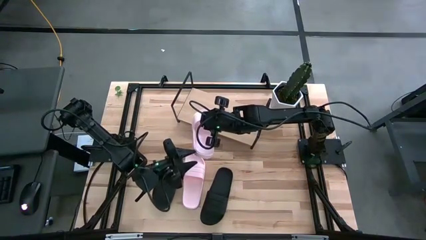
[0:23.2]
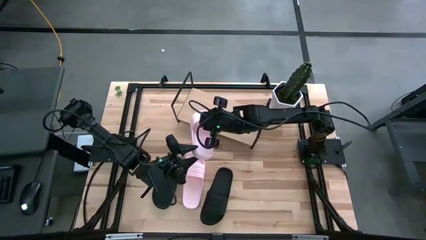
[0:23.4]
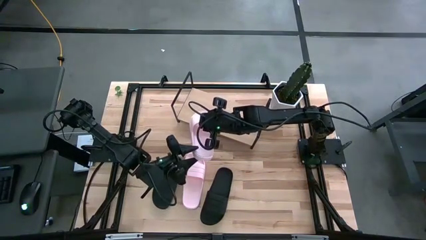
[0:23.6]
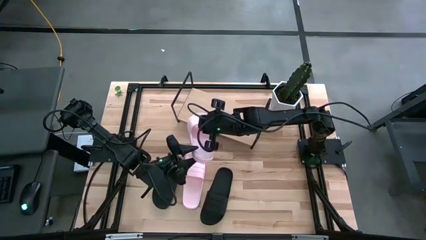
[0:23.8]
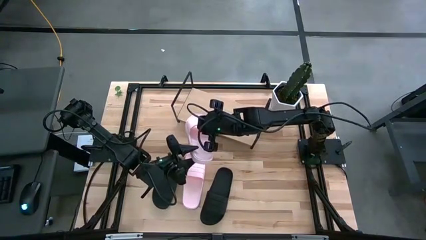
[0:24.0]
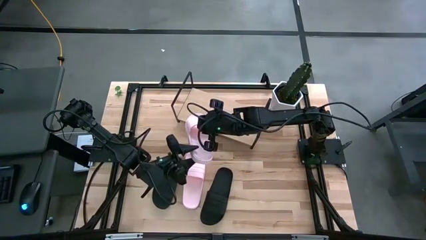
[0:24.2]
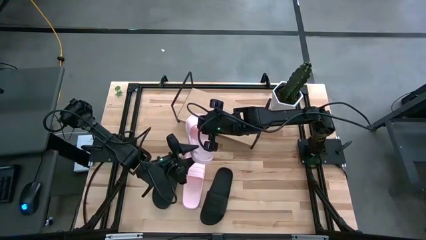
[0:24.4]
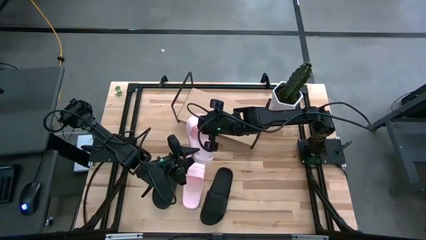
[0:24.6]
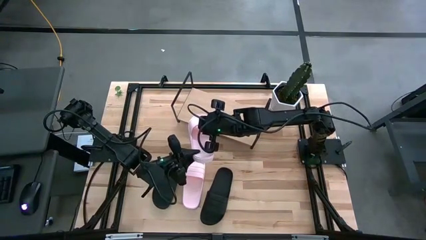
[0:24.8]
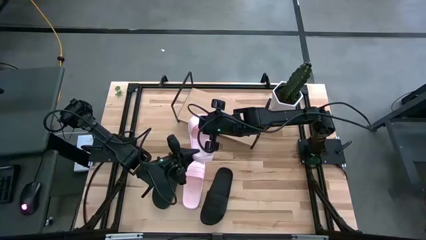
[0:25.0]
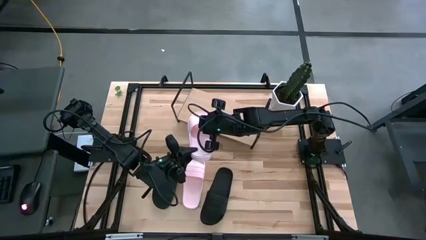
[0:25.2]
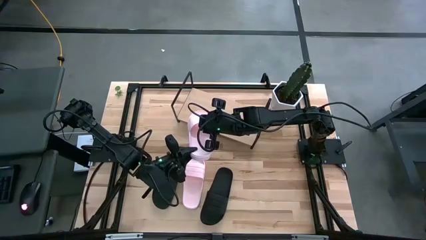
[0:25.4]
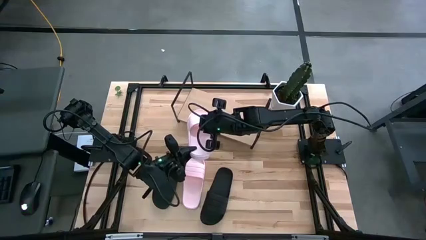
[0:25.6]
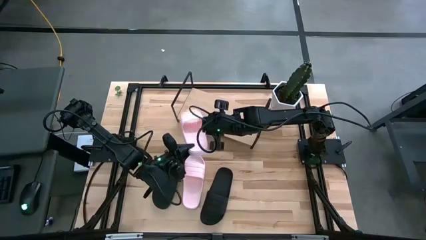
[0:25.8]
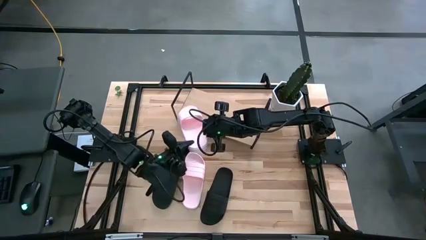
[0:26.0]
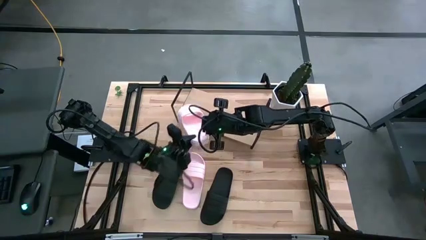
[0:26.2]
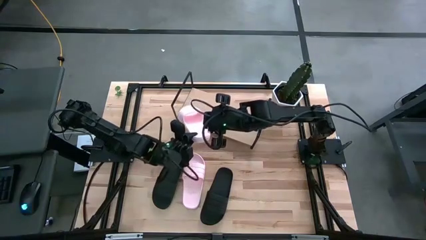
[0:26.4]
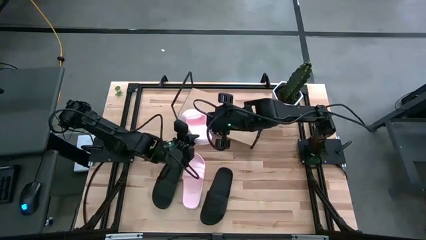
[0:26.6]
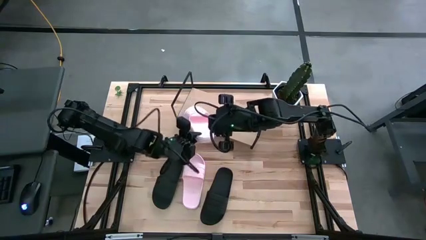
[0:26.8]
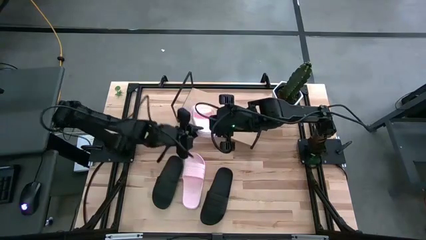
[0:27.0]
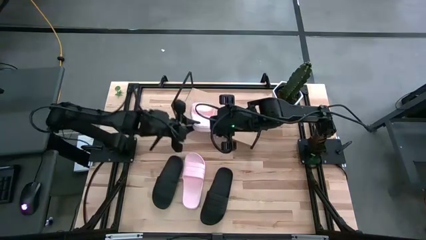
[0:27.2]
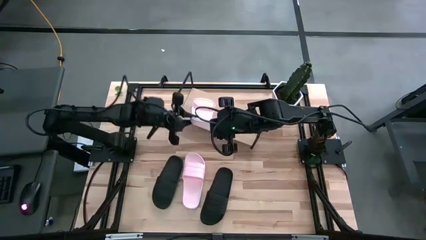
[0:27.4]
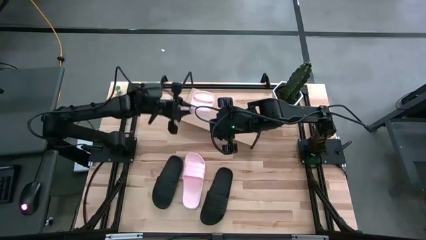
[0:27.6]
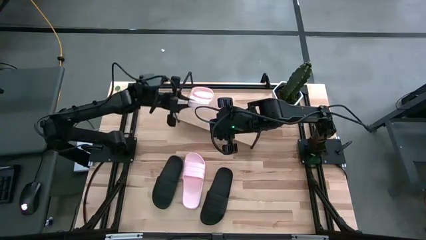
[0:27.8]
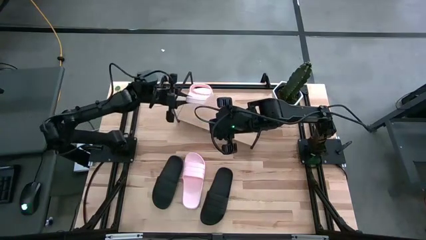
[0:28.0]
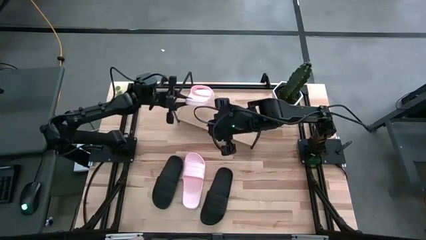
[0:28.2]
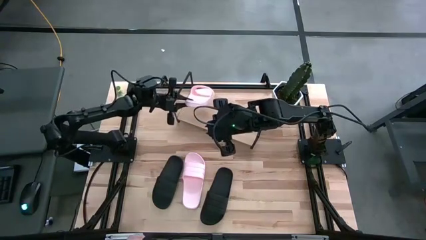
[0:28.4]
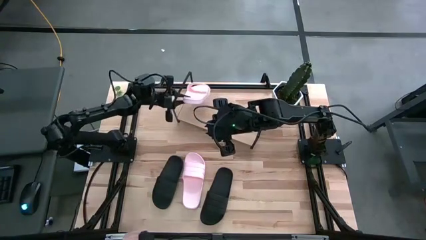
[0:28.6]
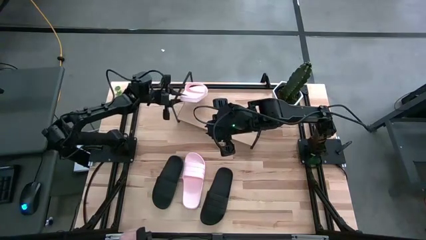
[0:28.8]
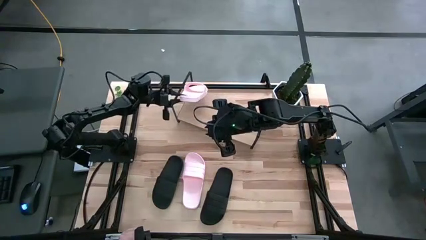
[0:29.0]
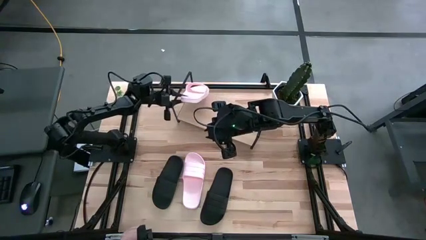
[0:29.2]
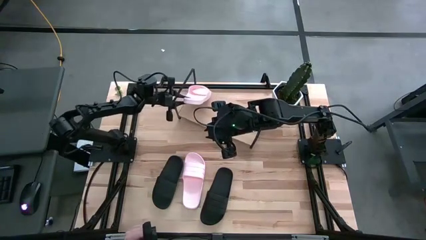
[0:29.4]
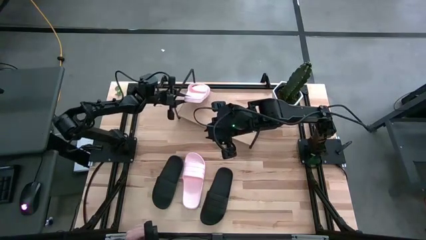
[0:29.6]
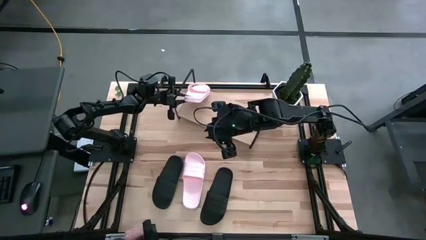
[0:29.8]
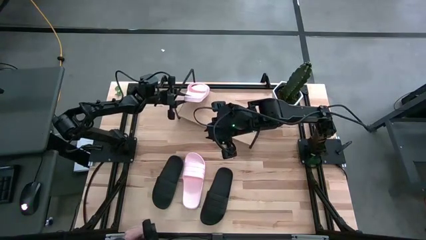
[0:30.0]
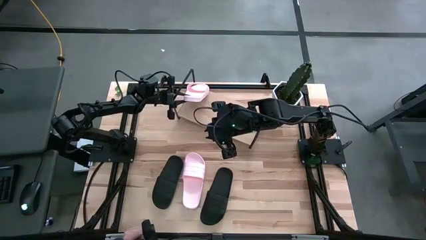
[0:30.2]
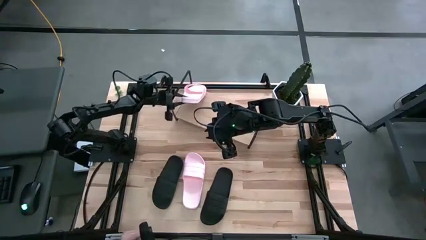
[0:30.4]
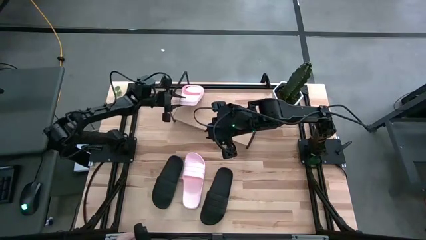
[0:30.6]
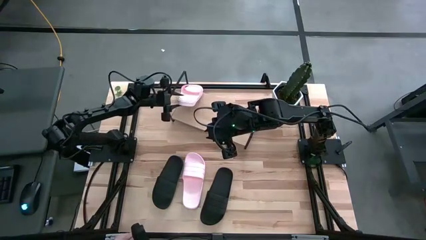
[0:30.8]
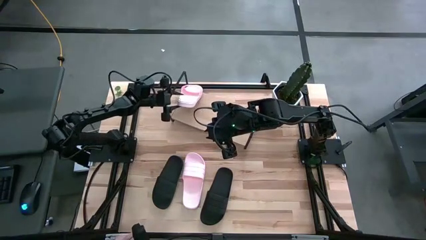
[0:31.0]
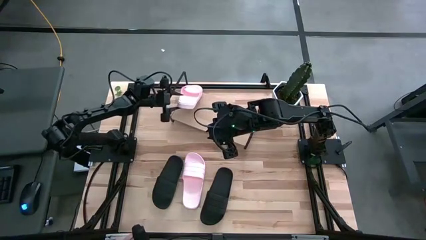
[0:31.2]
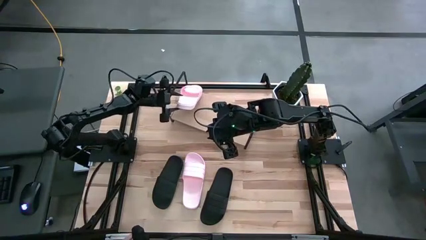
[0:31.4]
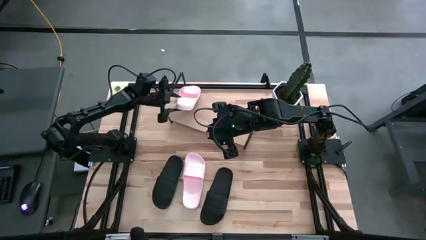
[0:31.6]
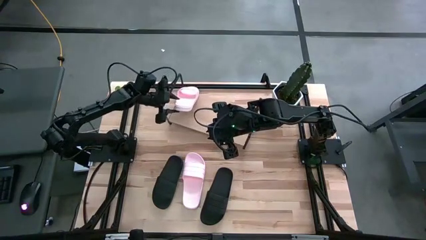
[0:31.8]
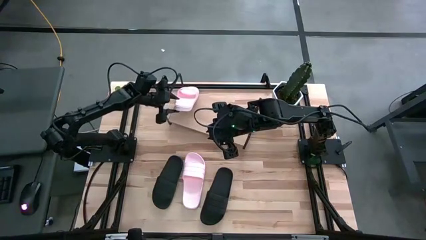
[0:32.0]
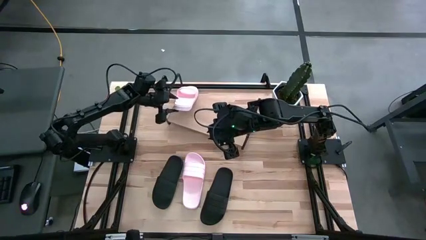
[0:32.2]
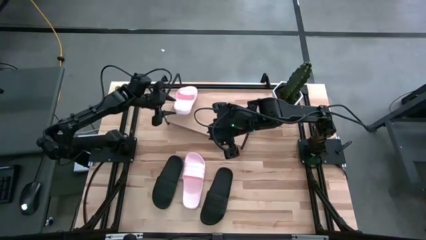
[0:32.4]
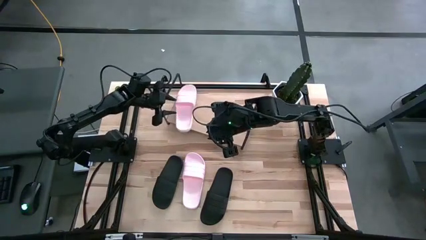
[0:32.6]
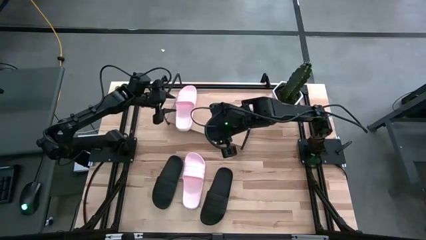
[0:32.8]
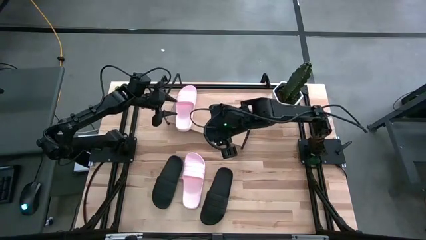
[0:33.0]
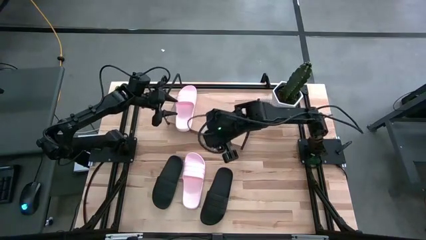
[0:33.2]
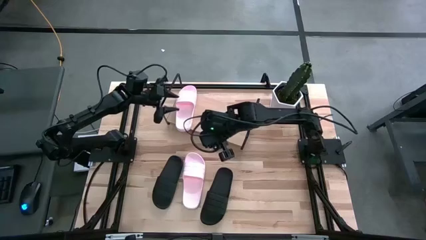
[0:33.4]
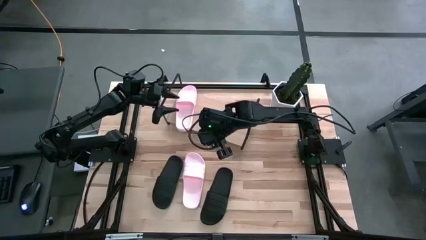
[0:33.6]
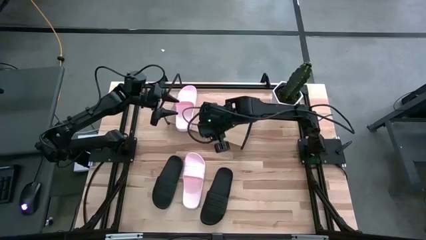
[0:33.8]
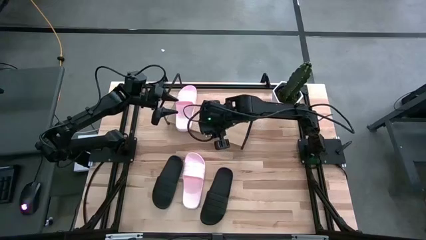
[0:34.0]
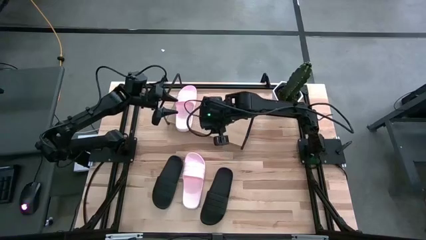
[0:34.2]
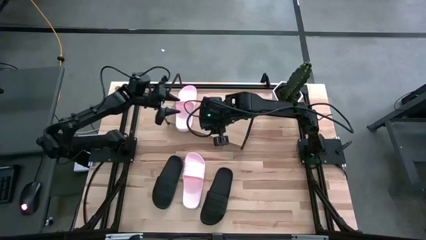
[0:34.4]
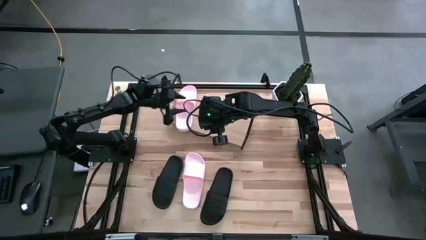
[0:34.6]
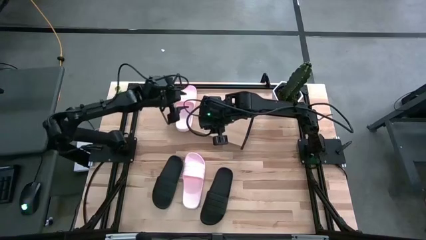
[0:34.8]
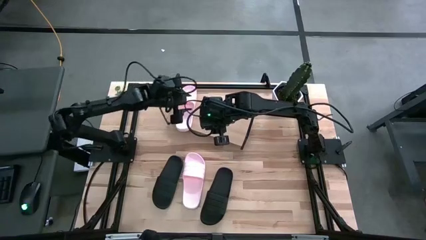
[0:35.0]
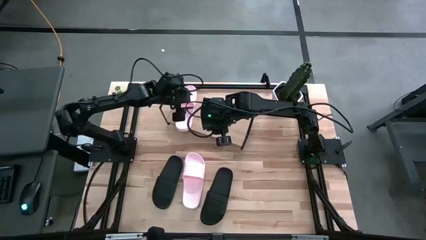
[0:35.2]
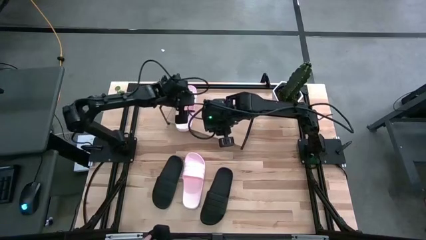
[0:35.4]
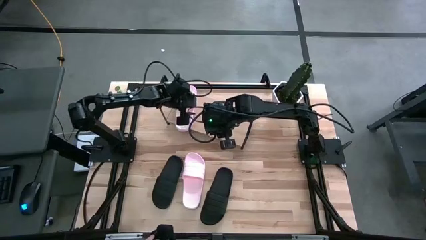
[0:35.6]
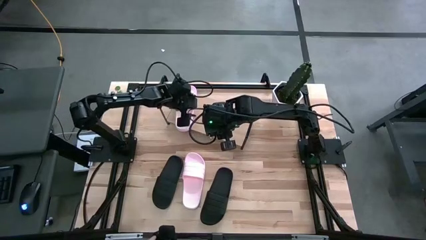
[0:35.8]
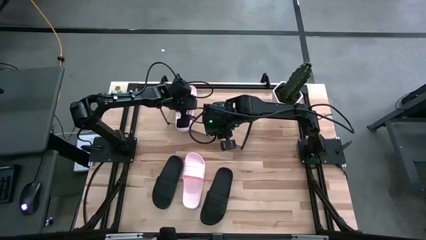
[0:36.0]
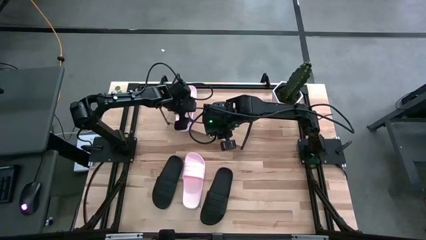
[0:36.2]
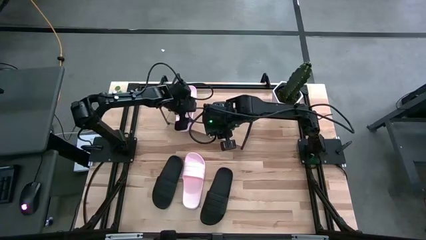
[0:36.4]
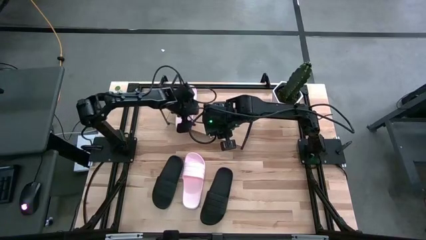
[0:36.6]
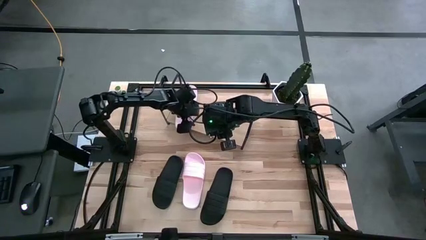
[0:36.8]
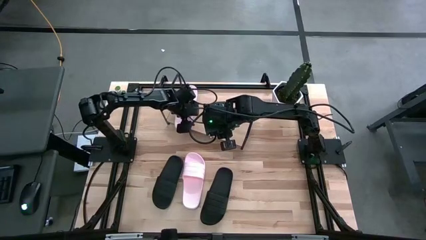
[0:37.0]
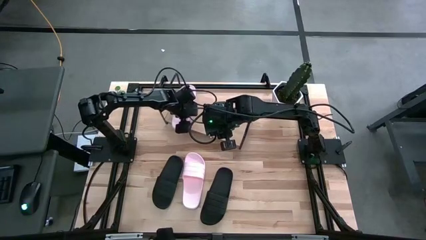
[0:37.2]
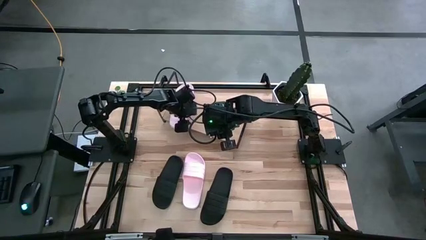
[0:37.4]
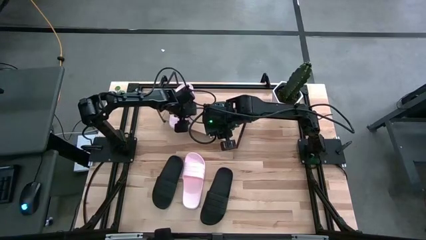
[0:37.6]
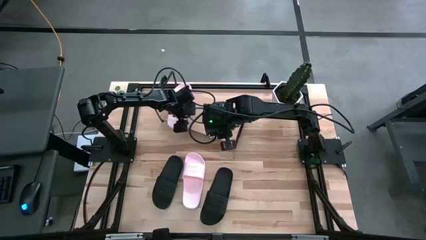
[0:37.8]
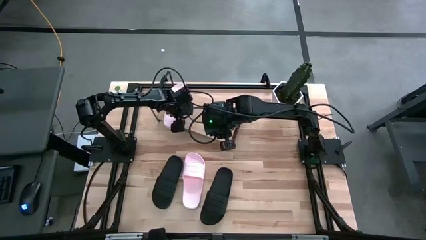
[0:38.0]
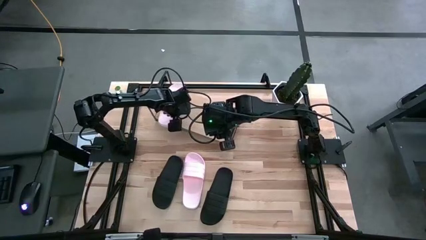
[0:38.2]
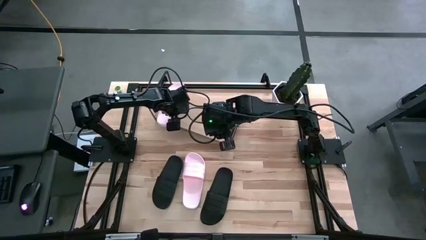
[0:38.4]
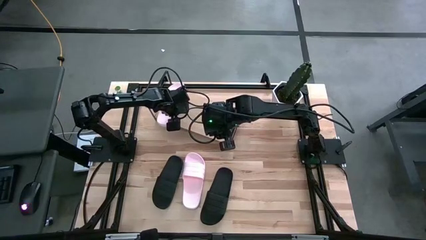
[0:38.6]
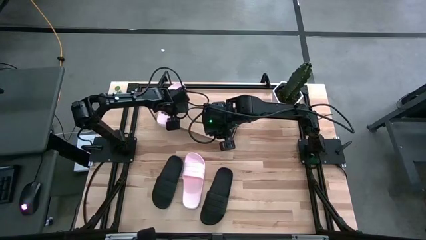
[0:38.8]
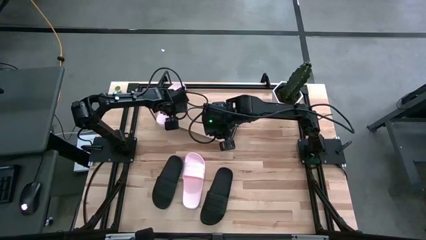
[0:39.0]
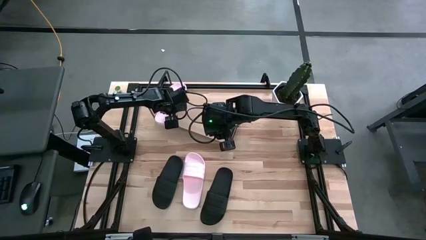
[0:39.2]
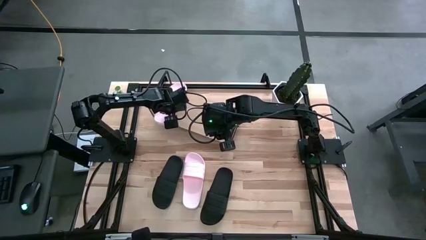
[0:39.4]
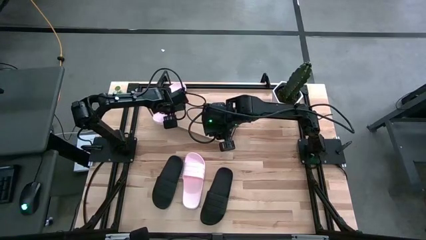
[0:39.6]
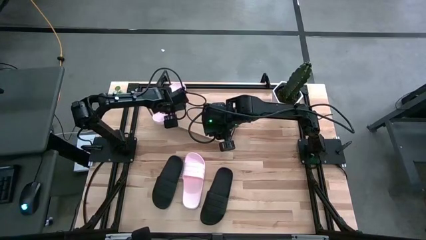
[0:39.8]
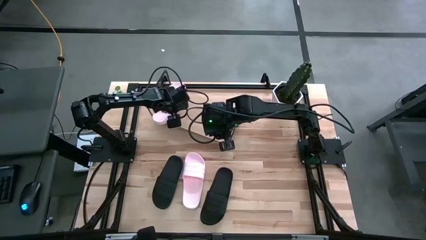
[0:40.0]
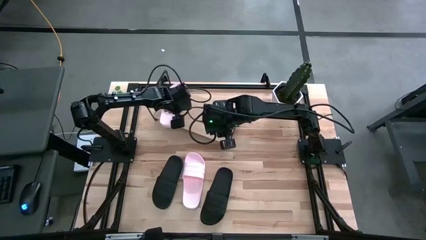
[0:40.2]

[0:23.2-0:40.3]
Task: Pick and place slides into the shelf
Put the right pink slide on the shelf
